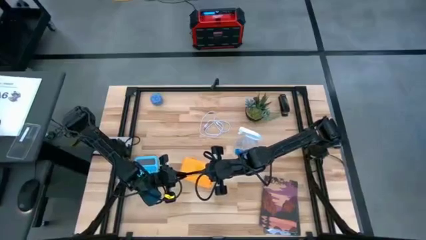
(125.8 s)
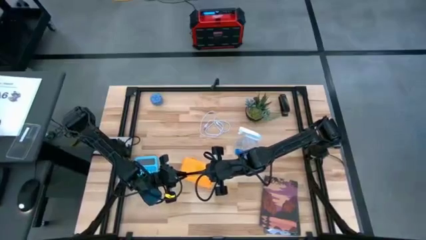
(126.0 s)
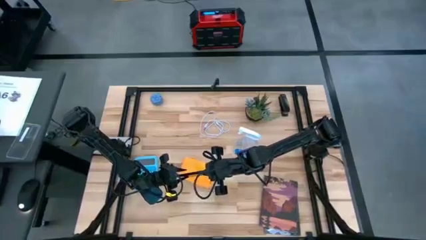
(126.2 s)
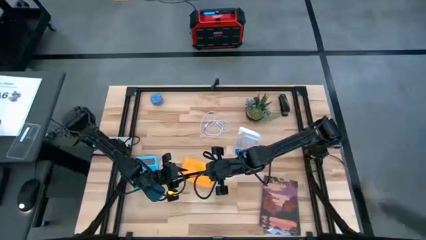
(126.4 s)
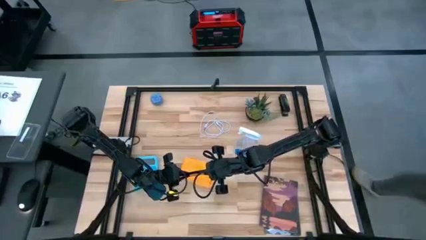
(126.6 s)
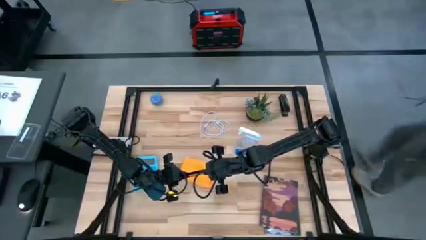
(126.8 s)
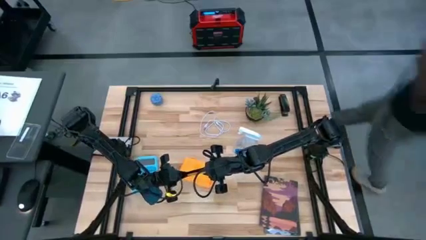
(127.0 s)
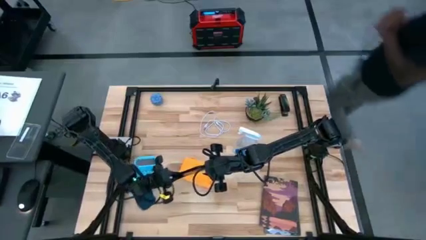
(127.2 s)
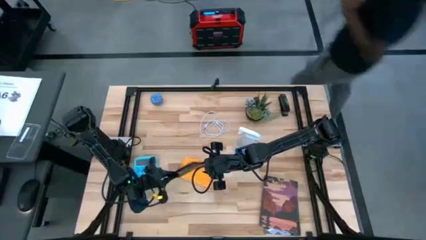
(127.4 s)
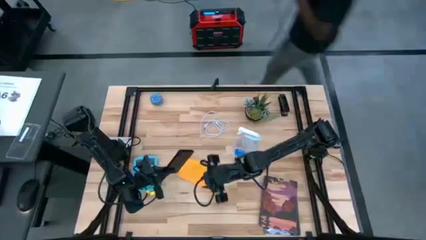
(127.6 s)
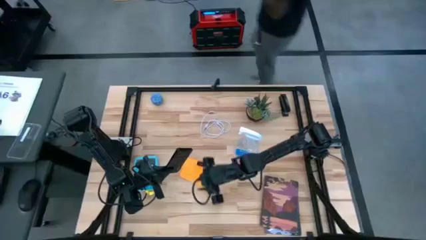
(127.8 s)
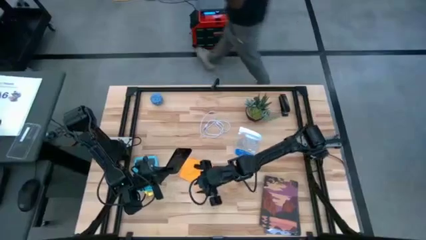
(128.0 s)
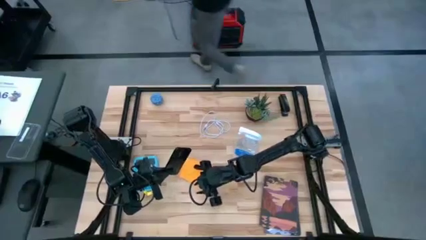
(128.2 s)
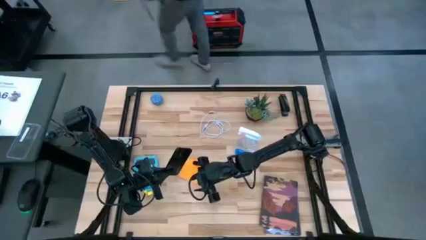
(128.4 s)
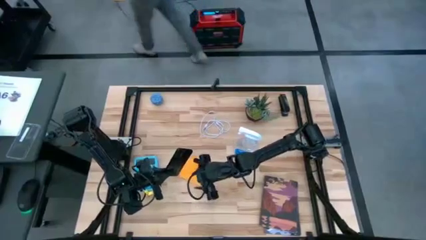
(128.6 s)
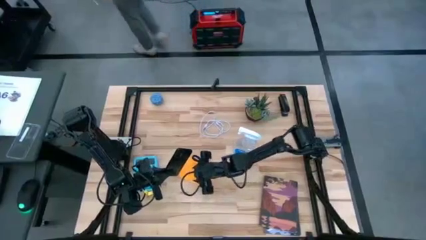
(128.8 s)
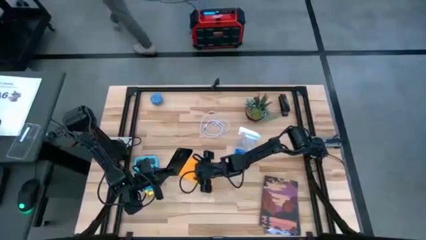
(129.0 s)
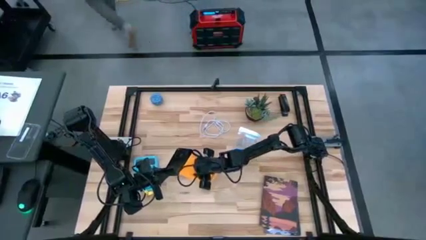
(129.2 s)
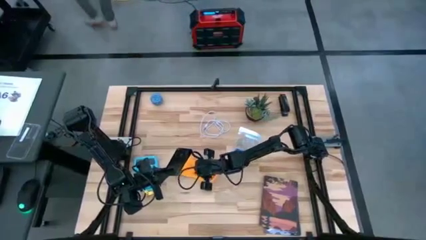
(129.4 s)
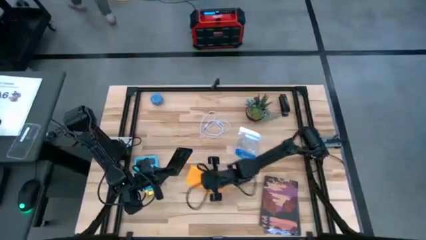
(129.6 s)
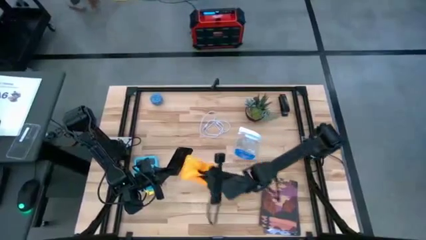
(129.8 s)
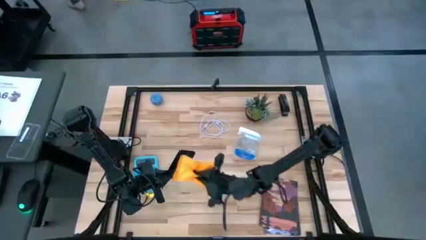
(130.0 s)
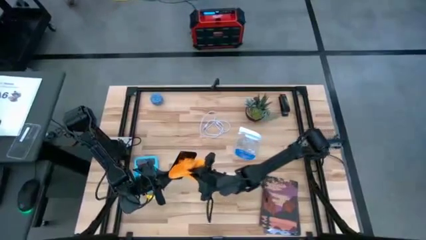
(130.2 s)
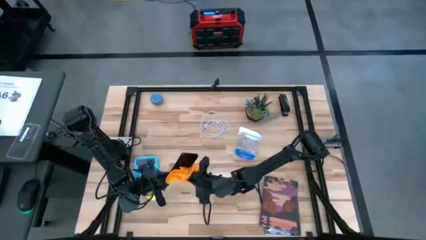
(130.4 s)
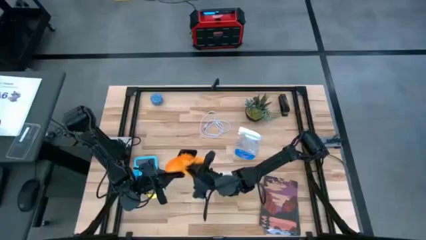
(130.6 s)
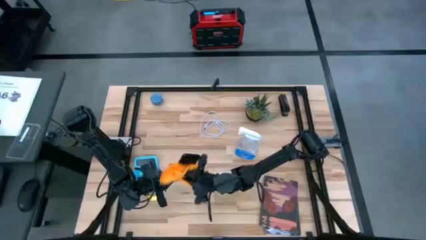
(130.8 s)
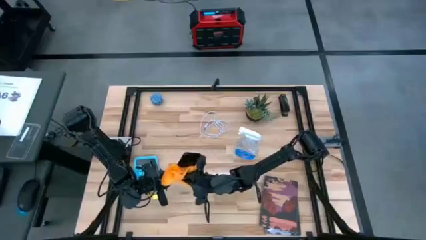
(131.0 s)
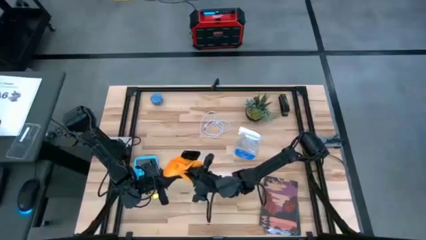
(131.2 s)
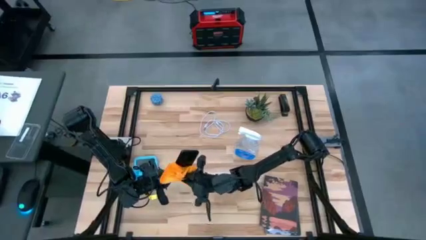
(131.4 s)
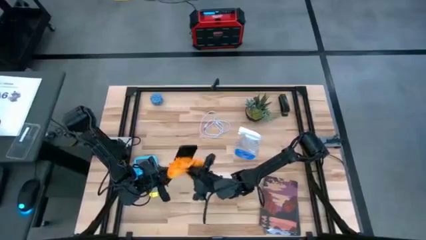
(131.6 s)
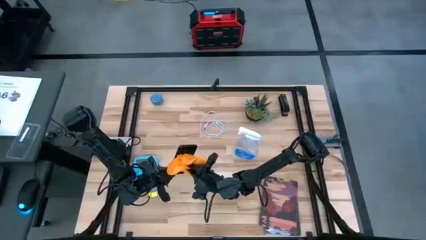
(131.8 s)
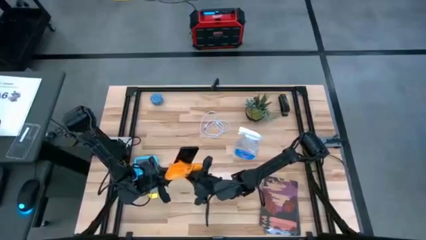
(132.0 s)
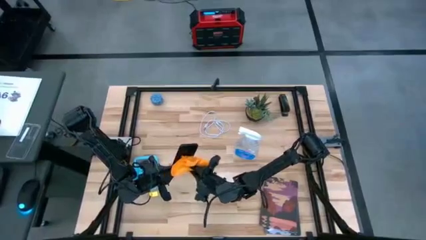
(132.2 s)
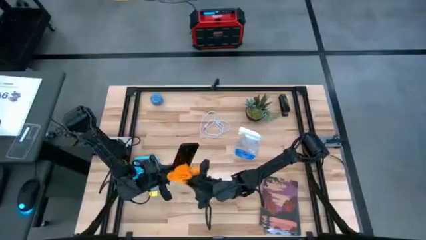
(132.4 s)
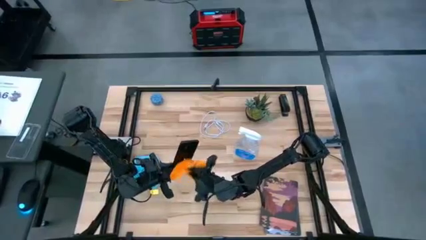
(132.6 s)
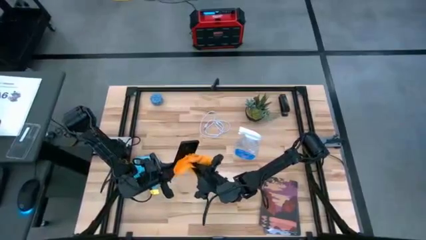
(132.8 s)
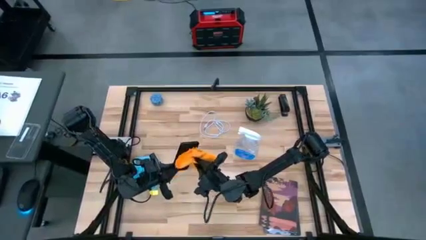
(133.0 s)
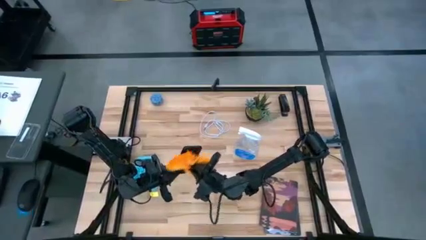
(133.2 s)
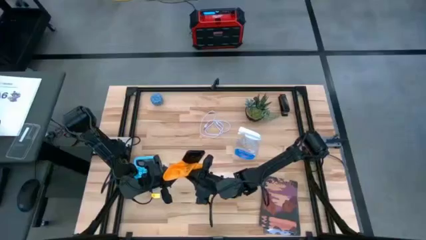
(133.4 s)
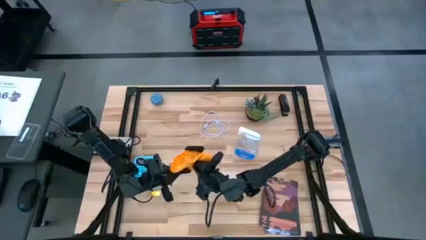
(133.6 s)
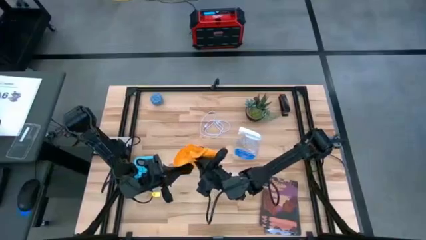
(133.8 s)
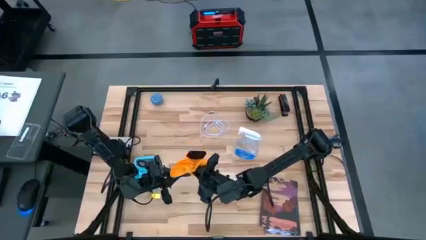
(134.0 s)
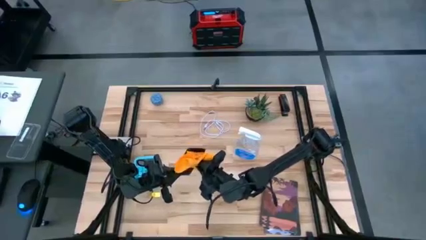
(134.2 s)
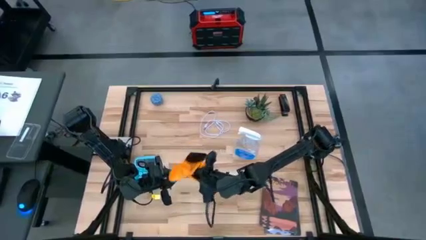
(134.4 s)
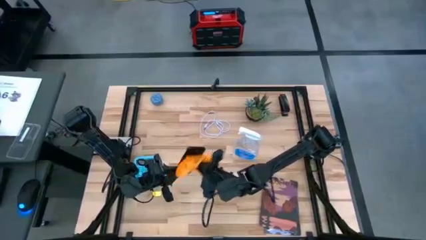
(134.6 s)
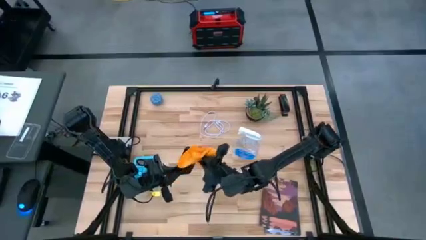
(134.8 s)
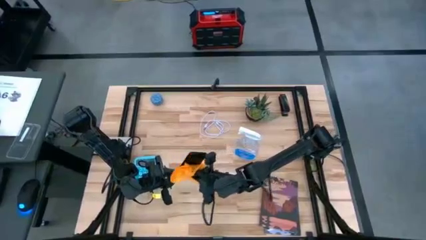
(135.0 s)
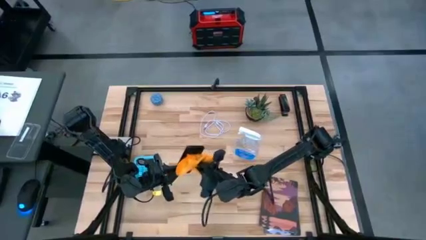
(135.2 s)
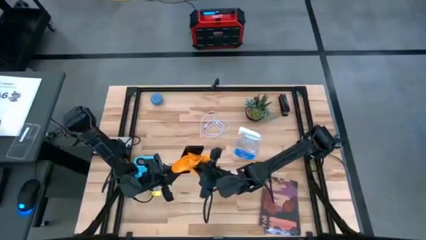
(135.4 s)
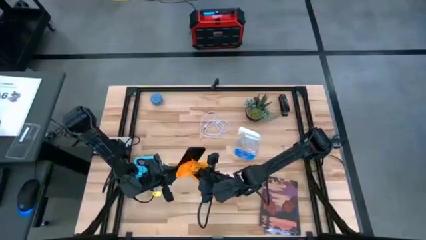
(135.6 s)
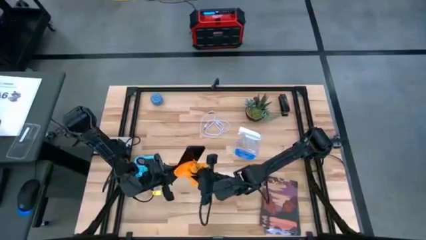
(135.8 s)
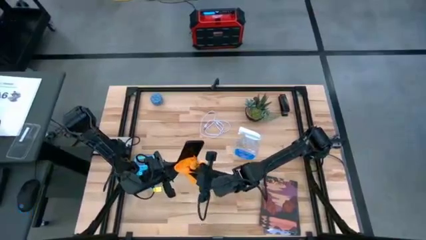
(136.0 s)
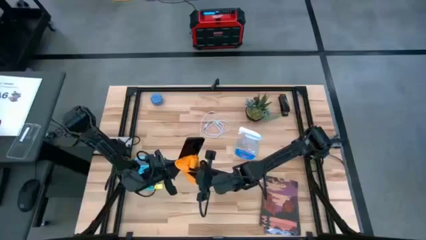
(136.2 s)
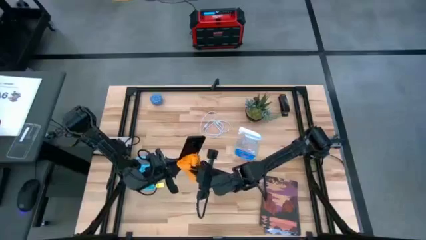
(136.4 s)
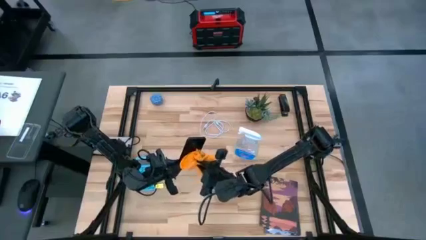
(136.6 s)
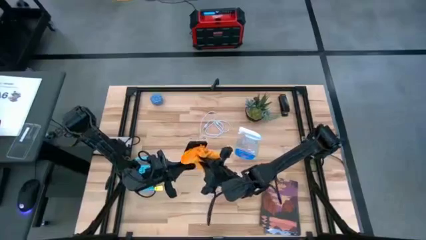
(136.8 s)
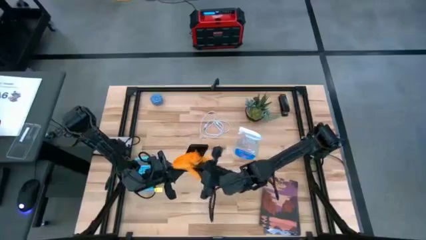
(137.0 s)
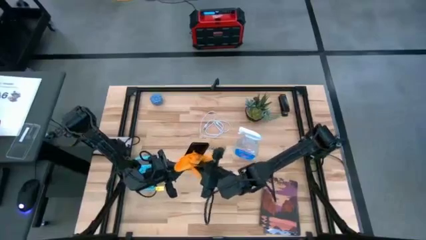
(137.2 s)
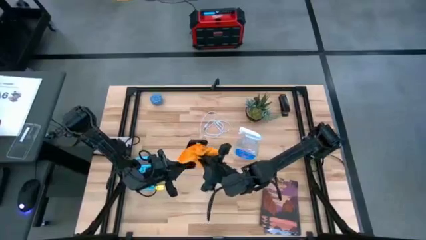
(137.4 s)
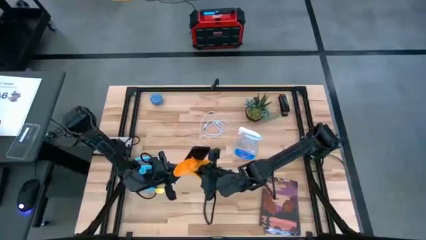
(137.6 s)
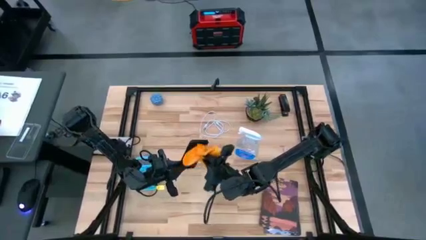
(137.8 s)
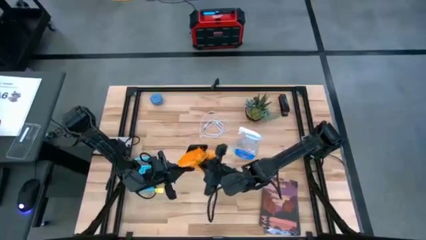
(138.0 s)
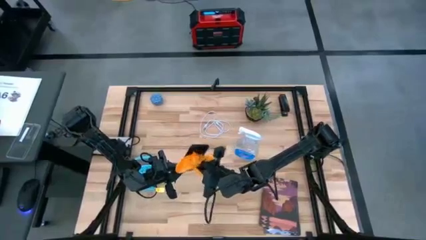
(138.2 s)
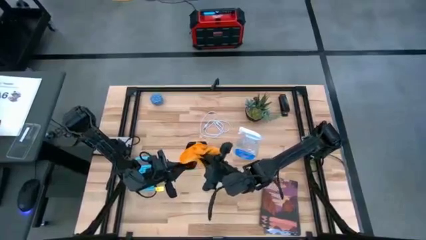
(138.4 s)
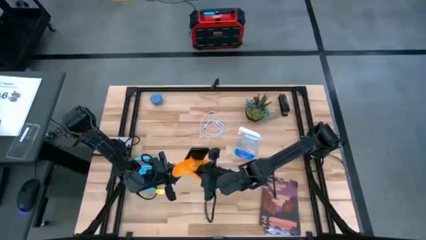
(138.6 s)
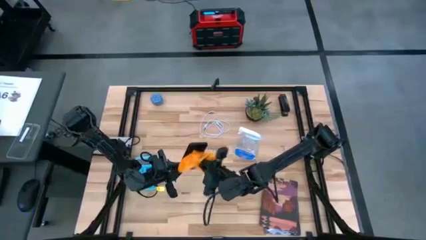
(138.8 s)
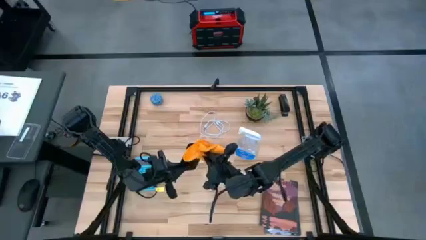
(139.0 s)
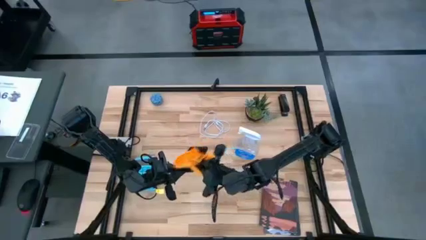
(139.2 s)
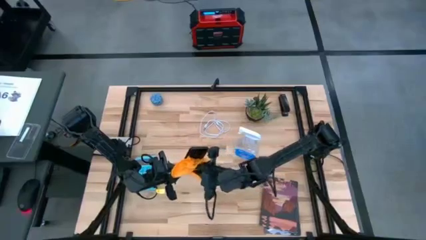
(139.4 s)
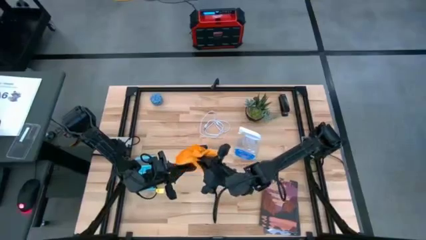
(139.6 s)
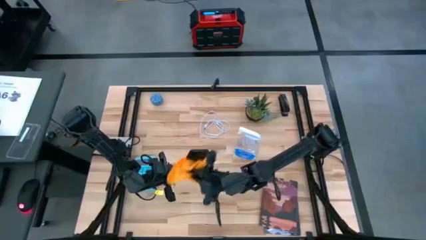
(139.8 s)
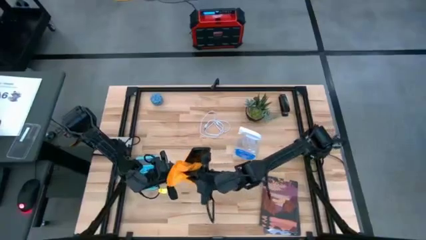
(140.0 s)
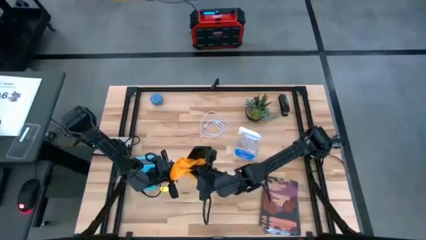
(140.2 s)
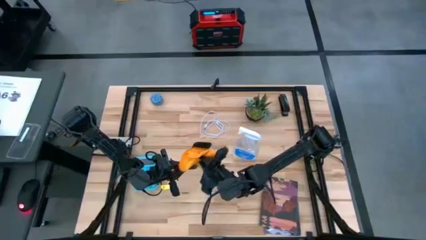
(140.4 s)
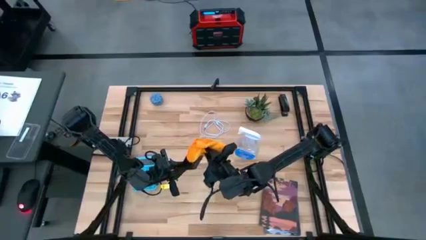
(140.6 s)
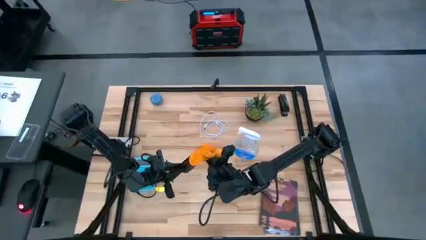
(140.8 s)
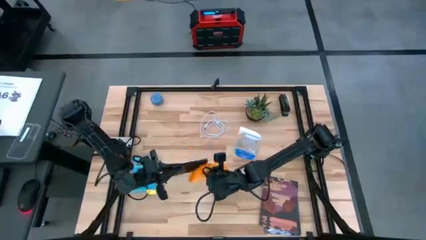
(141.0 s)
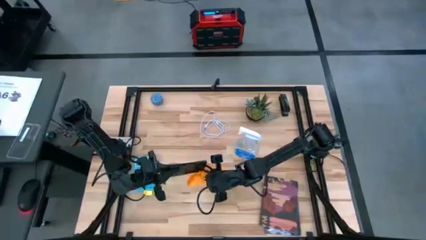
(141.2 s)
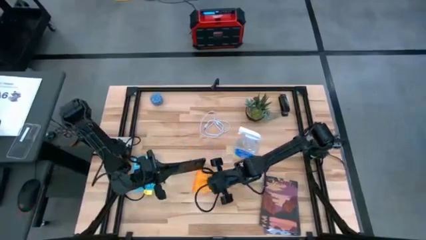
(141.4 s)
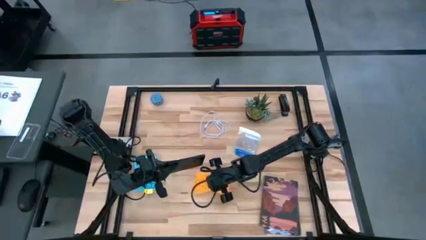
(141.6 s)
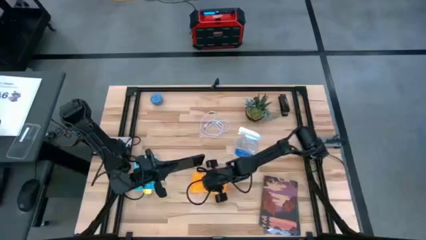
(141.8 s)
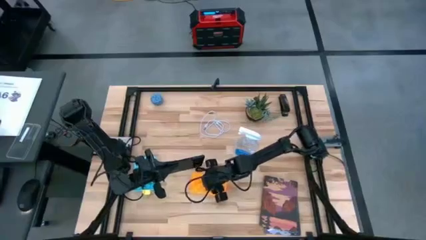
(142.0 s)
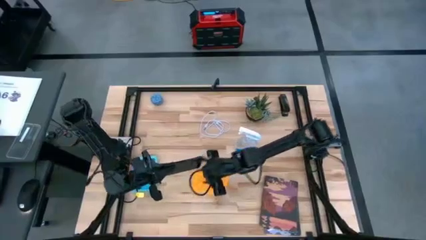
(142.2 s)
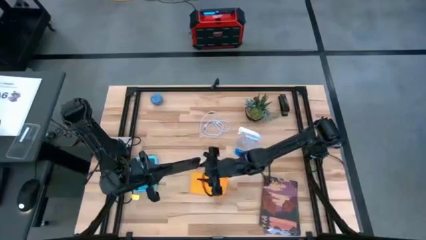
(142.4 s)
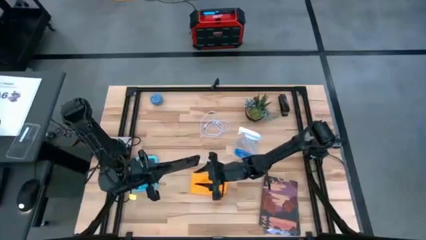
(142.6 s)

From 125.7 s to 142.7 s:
Task: Apply microfiber cloth
Wipe the black cellphone using microfiber cloth
